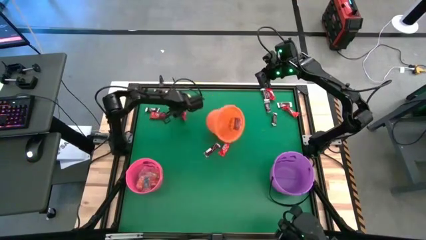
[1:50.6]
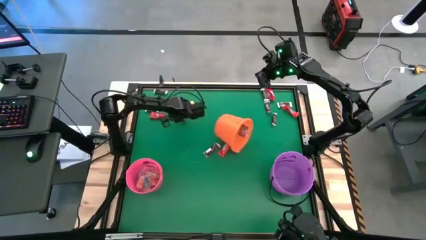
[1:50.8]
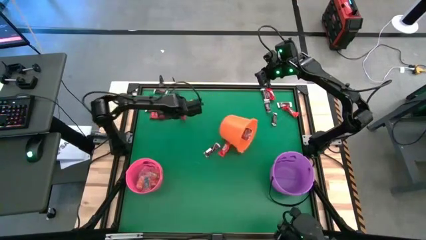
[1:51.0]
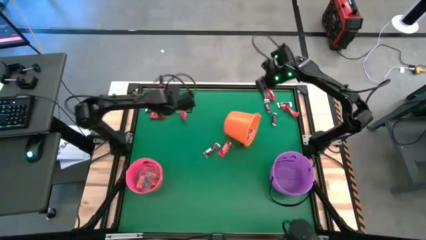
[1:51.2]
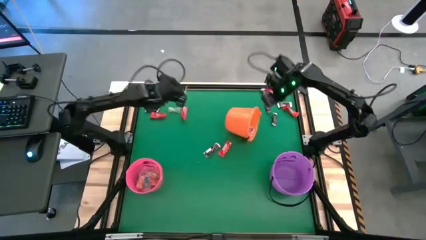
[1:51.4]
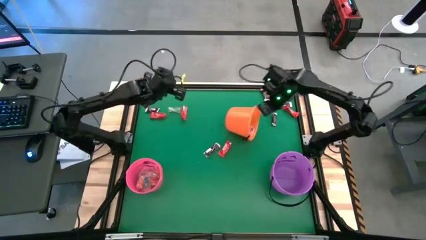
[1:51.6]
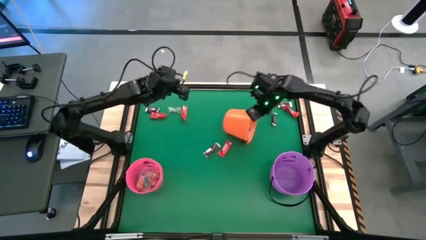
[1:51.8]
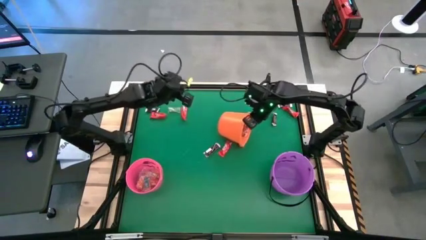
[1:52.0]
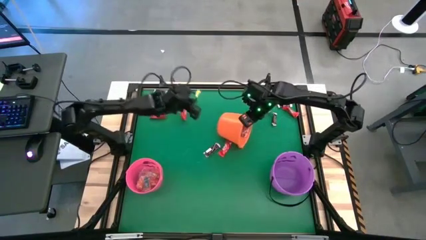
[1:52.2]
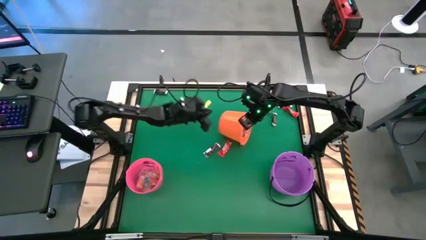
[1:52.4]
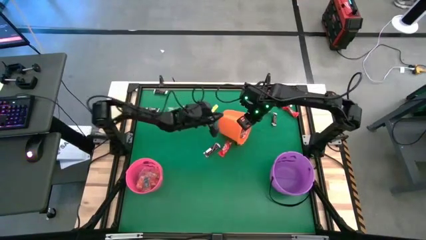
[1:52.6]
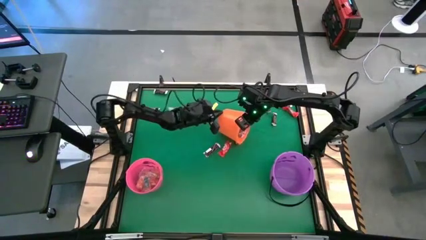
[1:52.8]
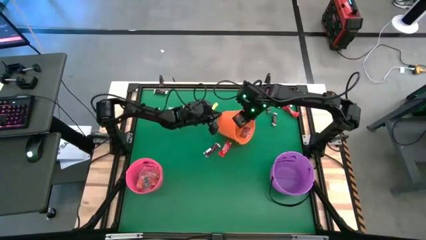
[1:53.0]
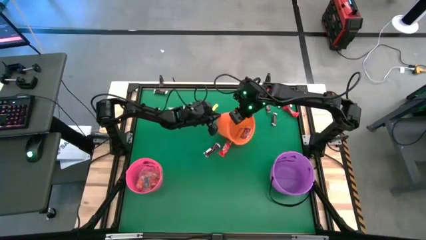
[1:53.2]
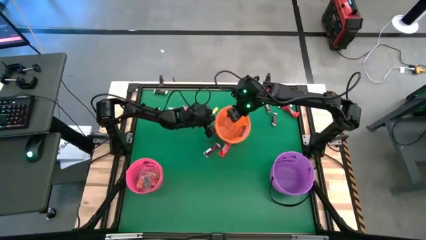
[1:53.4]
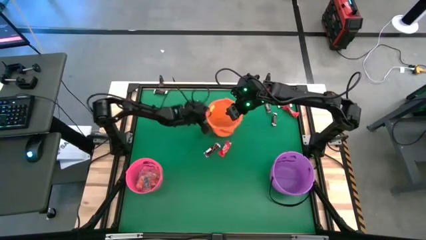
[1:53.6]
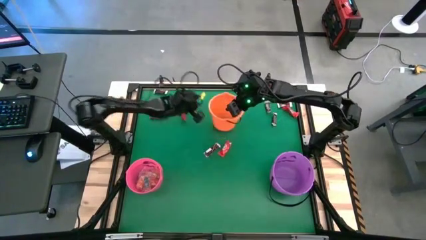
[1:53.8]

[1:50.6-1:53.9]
Task: Sort candy by brand, put in halloween buckets
Adjust the orange bucket

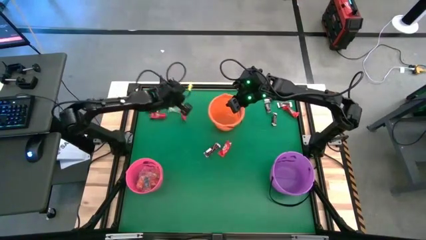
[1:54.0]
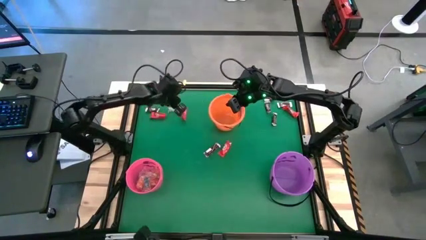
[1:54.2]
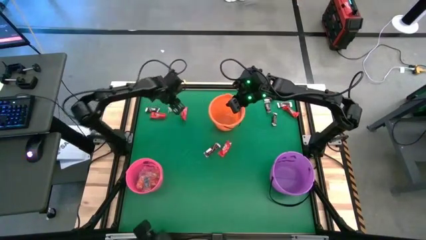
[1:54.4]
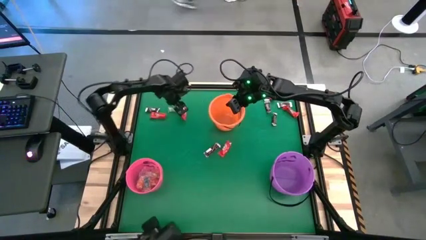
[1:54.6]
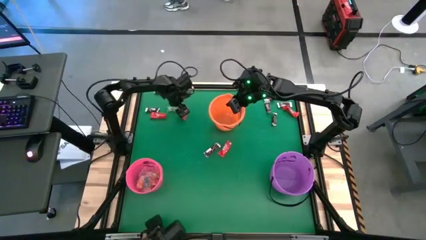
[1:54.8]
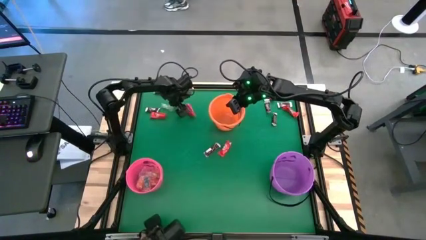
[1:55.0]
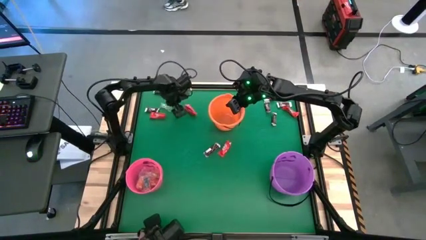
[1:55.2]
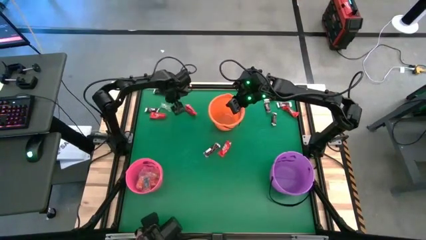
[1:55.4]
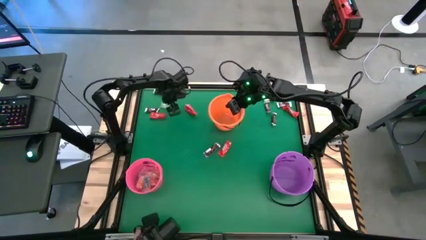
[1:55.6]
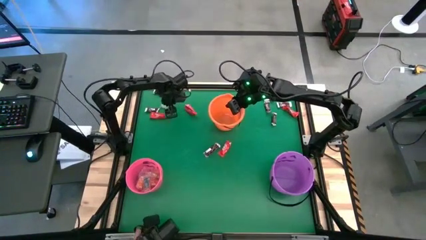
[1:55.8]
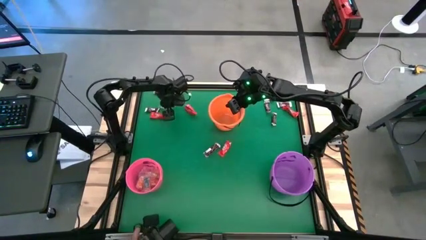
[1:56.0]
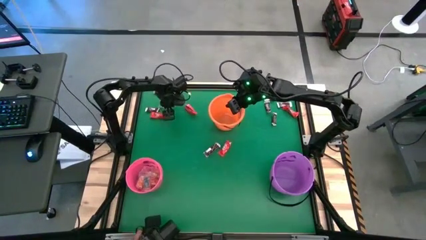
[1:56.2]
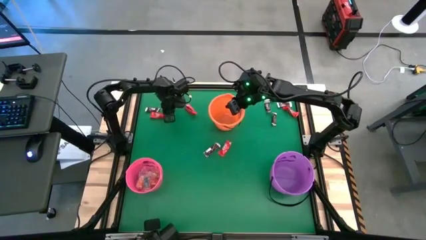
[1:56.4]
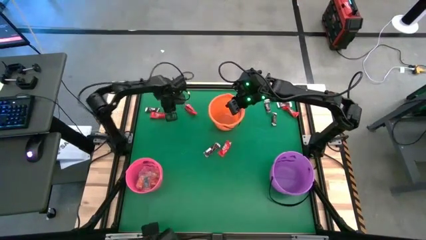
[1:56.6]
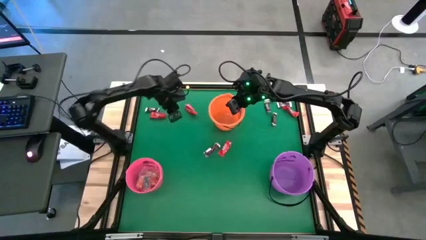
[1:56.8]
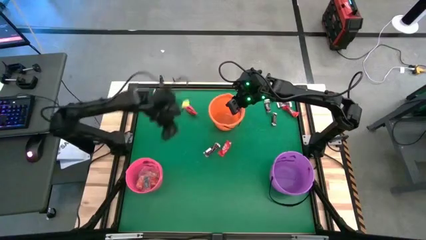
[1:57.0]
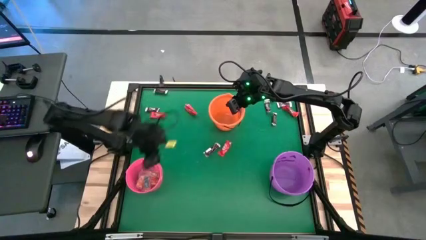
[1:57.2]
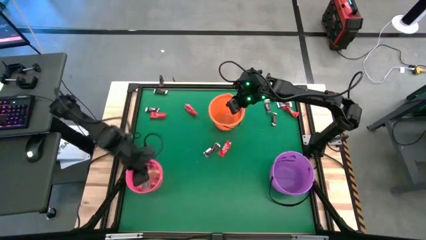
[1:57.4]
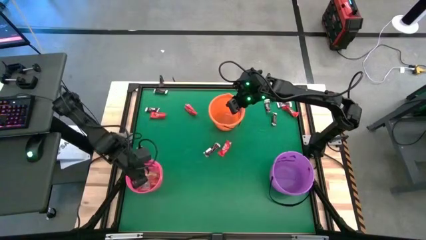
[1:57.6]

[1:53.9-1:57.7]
Put the green gummy into the pink bucket

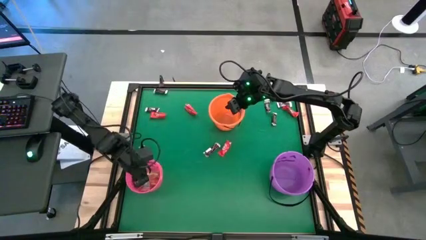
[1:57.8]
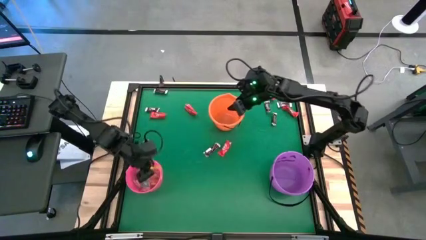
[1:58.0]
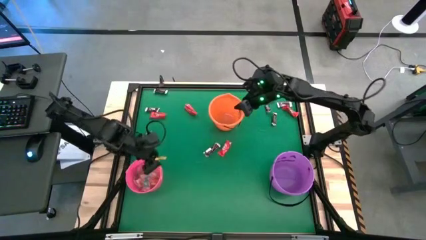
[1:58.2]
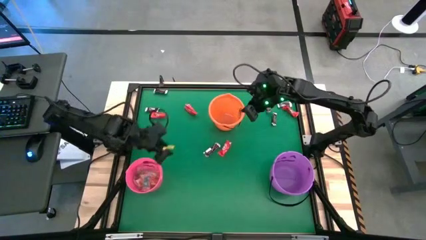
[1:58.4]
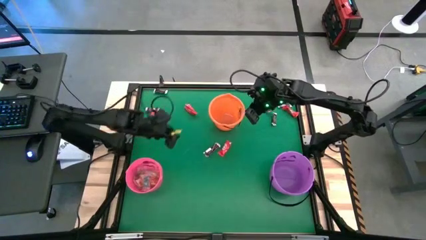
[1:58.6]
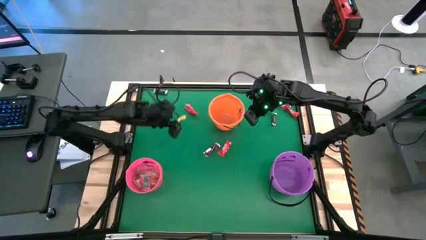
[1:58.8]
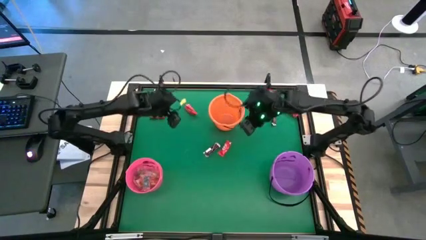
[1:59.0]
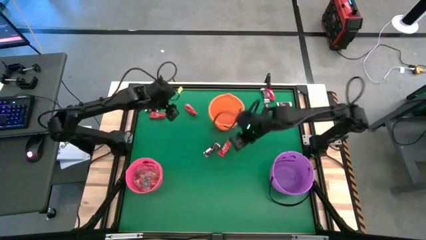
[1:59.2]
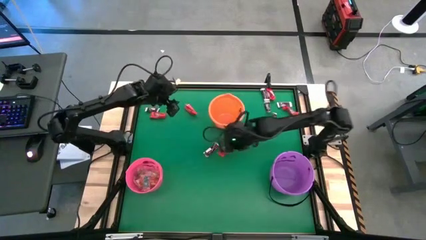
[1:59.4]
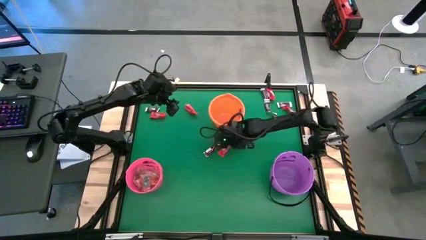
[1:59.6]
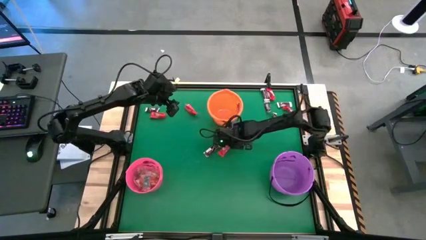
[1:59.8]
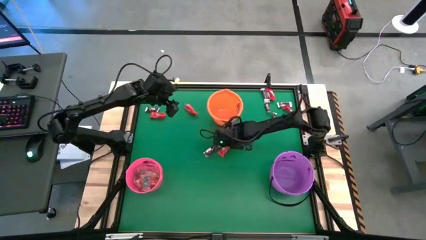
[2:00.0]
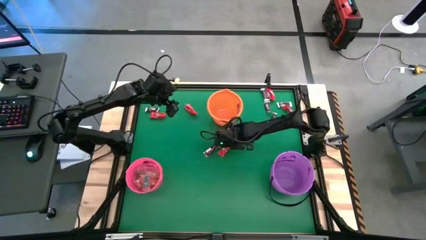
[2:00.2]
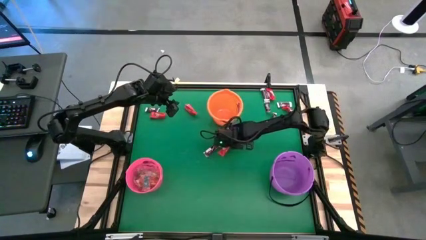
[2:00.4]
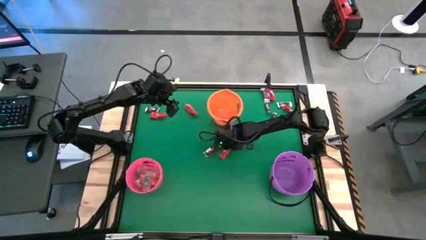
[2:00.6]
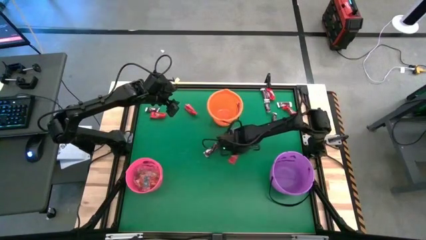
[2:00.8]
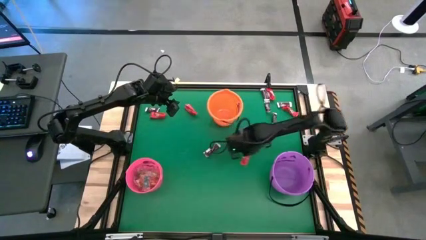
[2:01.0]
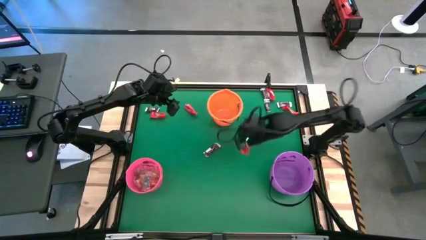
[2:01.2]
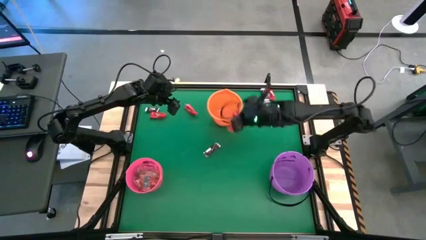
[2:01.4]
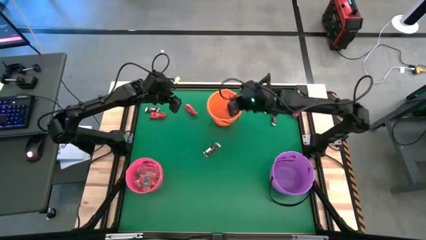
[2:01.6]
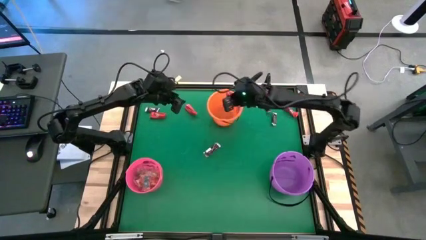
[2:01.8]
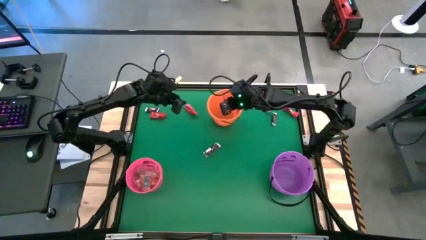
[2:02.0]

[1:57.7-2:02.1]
Put the red chocolate into the orange bucket

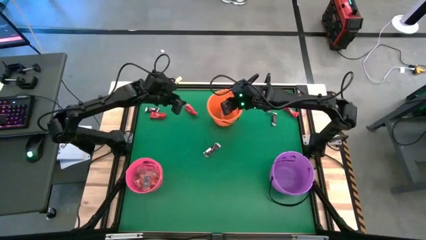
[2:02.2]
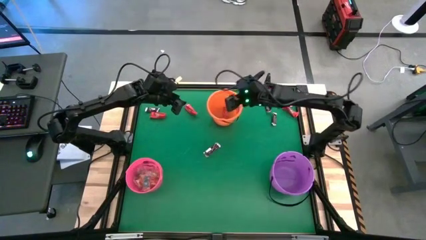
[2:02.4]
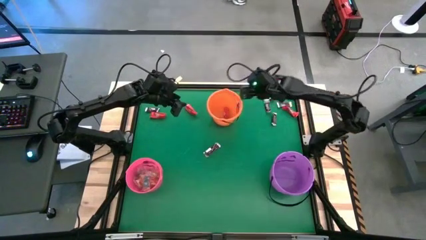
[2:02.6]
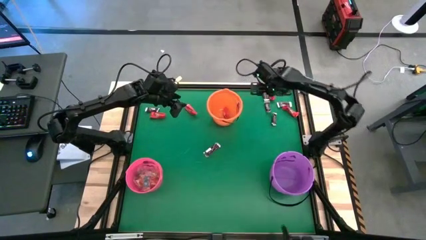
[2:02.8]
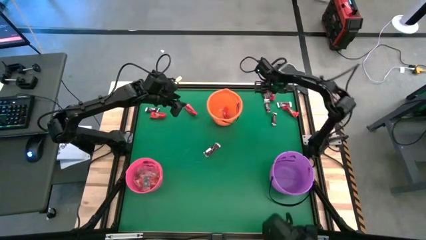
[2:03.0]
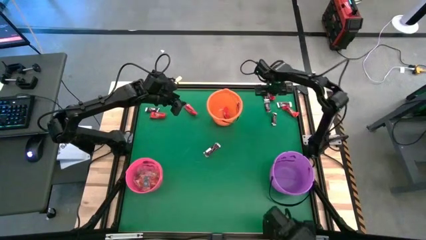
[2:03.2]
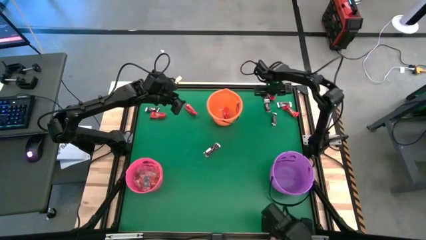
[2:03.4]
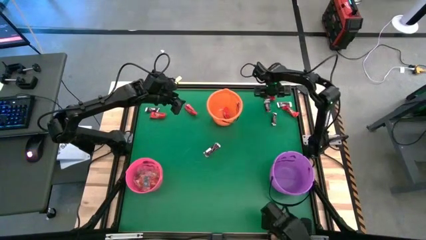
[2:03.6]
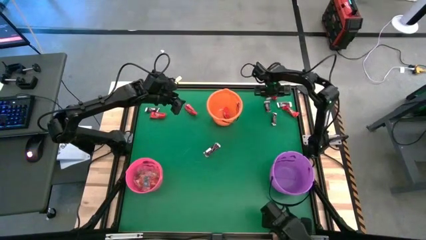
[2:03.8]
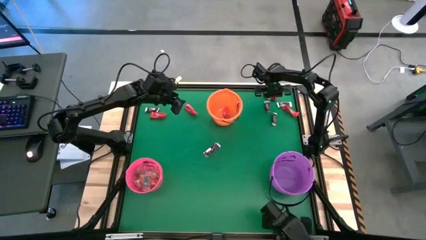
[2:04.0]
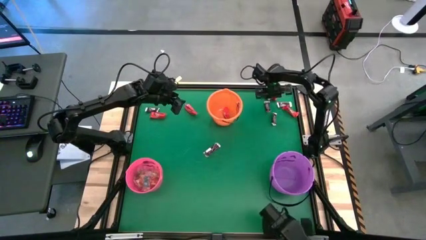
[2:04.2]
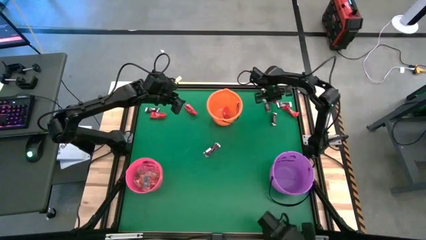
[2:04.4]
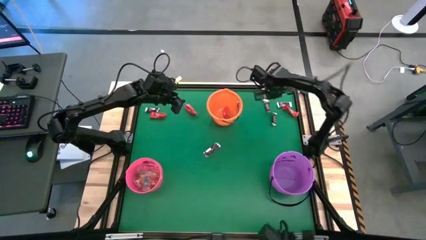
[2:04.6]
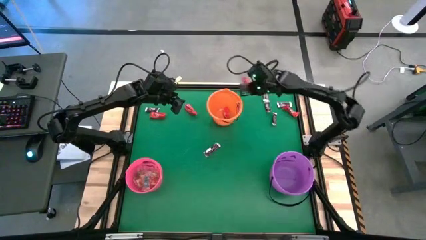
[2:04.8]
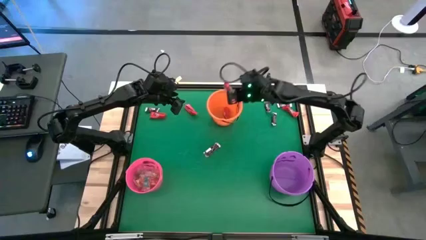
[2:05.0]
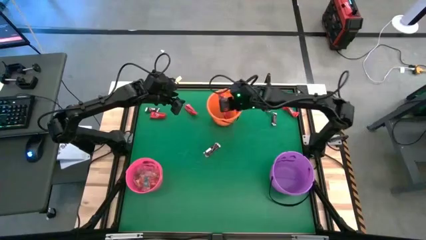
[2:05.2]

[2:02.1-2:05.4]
Put the red chocolate into the orange bucket

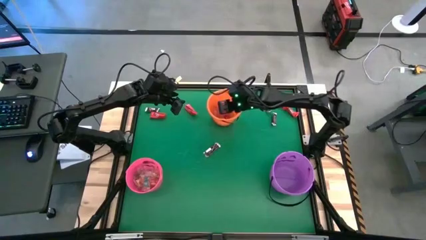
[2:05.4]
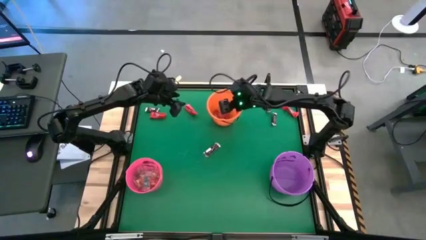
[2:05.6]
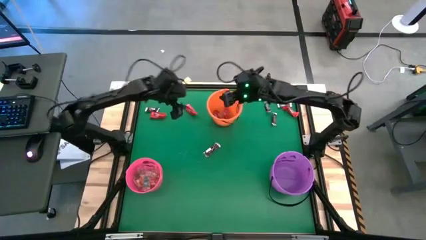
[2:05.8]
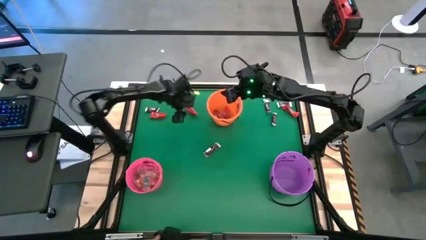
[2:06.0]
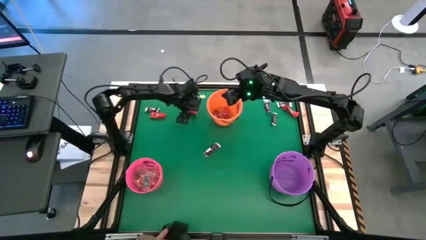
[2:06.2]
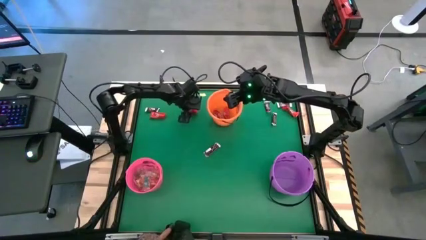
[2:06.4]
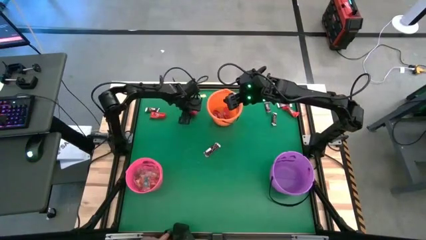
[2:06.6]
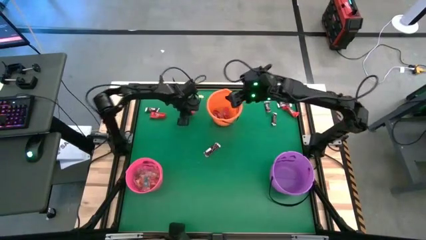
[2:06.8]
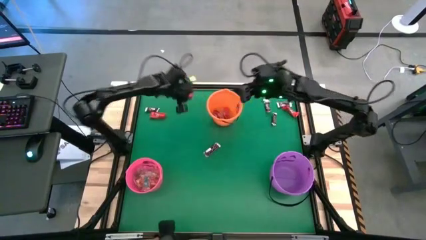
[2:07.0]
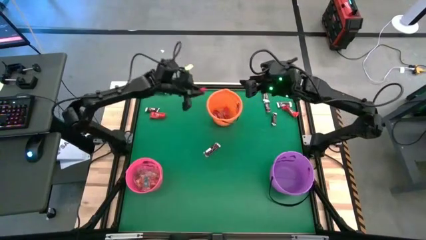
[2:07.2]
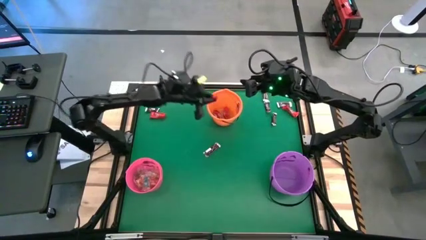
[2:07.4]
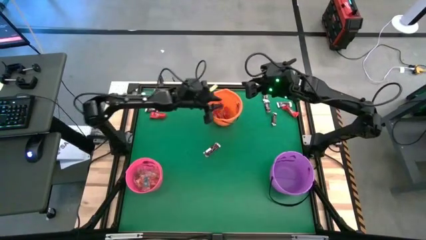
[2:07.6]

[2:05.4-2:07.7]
Put the red chocolate into the orange bucket
